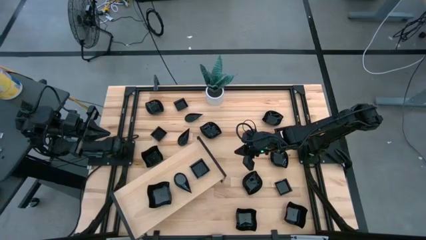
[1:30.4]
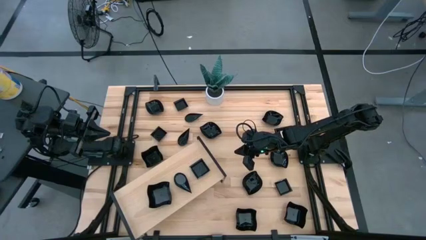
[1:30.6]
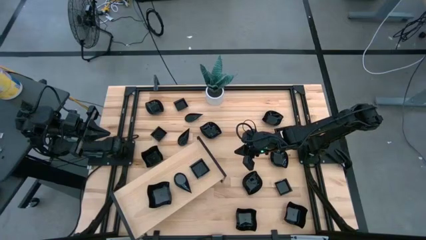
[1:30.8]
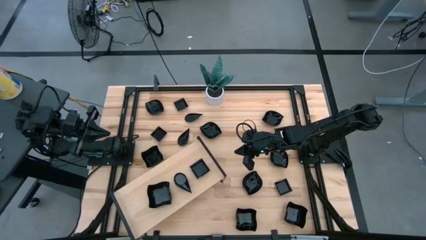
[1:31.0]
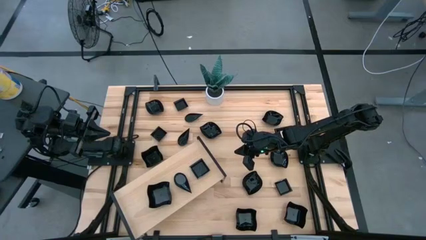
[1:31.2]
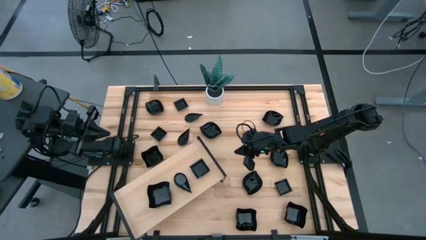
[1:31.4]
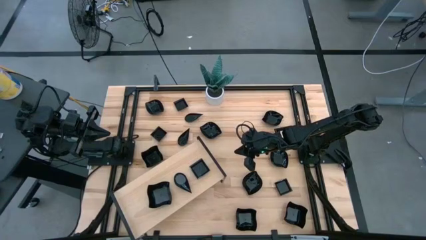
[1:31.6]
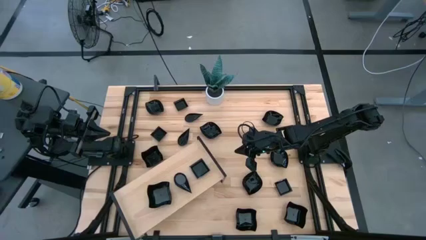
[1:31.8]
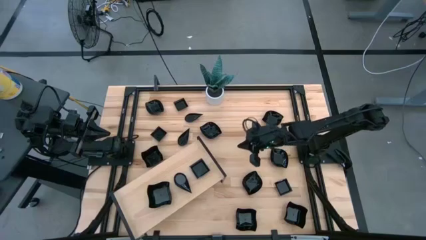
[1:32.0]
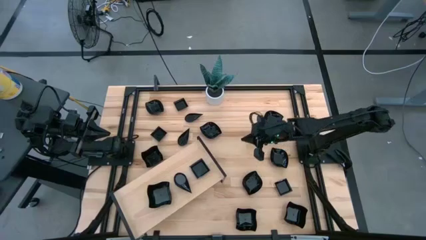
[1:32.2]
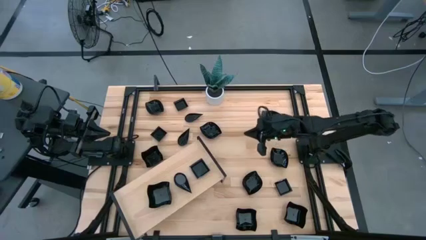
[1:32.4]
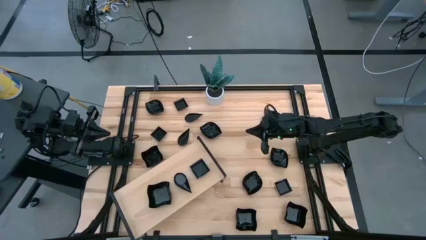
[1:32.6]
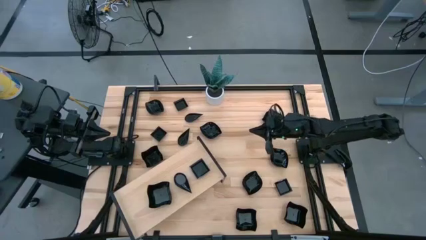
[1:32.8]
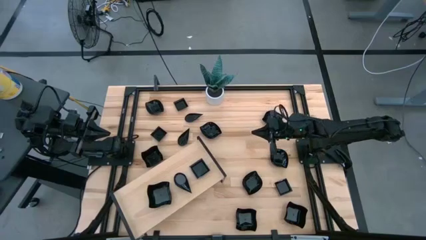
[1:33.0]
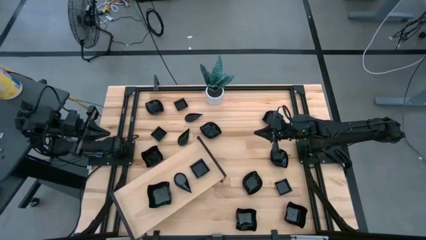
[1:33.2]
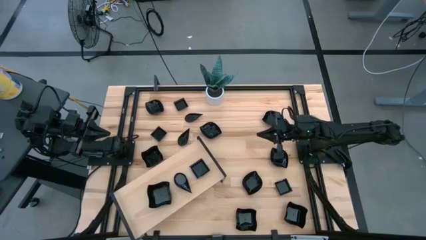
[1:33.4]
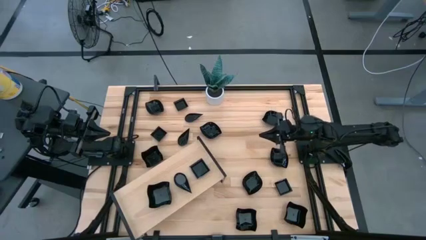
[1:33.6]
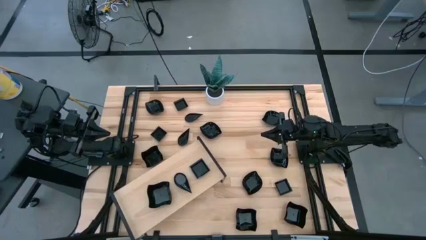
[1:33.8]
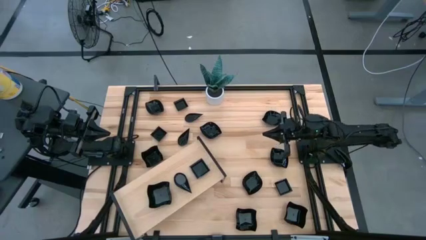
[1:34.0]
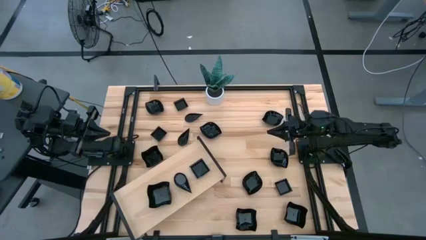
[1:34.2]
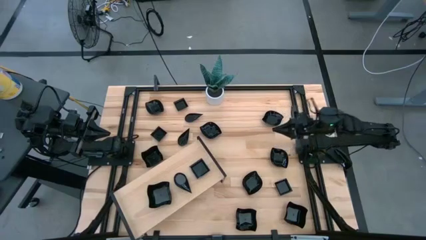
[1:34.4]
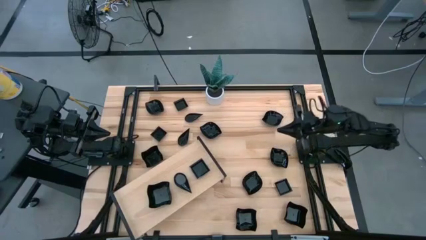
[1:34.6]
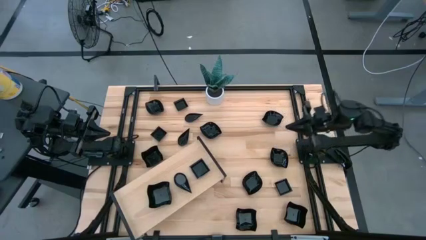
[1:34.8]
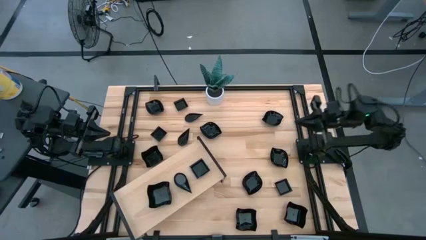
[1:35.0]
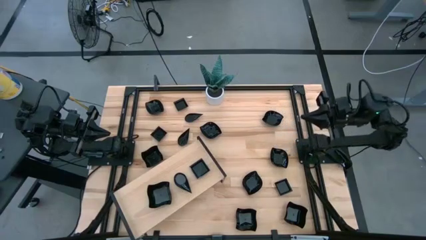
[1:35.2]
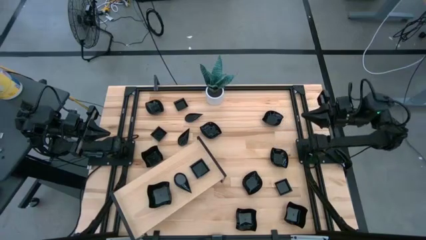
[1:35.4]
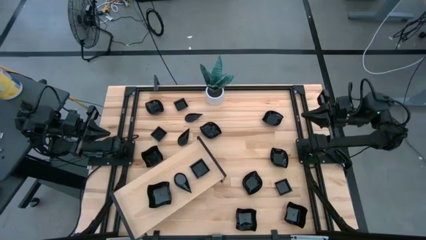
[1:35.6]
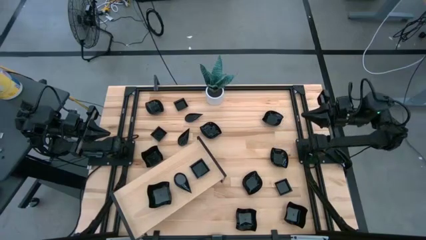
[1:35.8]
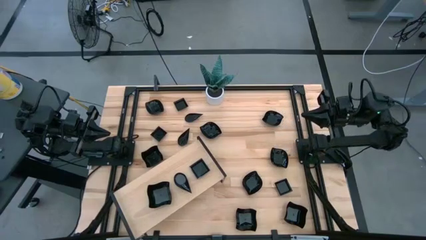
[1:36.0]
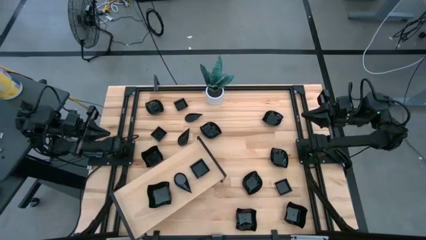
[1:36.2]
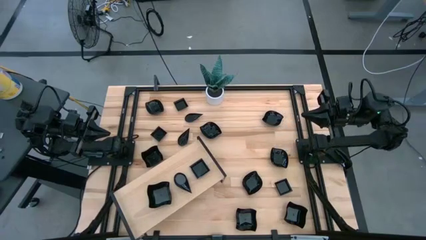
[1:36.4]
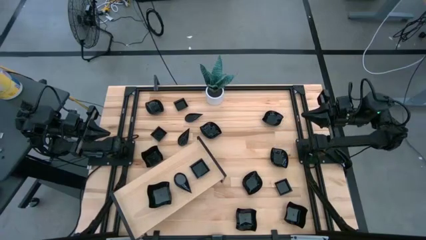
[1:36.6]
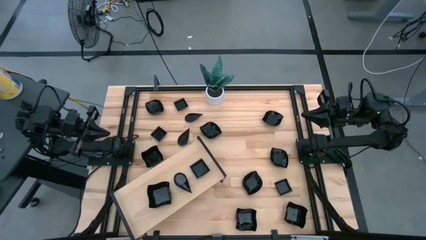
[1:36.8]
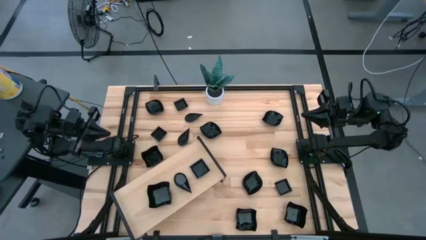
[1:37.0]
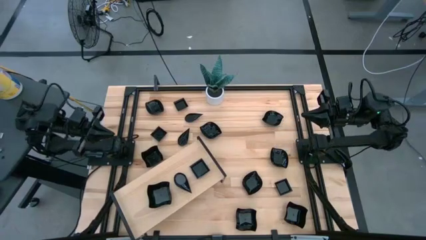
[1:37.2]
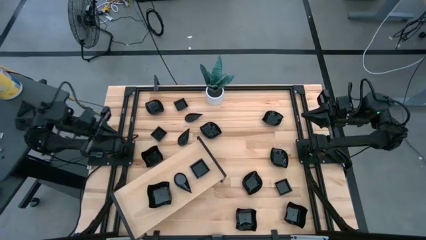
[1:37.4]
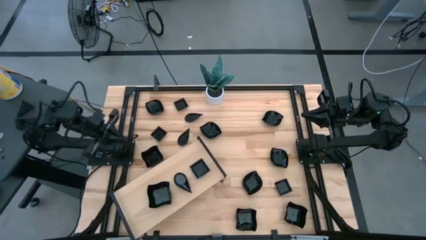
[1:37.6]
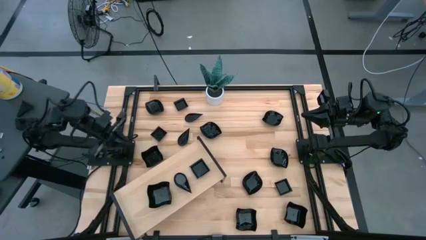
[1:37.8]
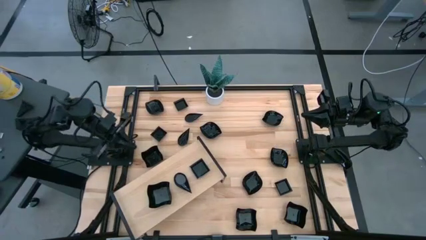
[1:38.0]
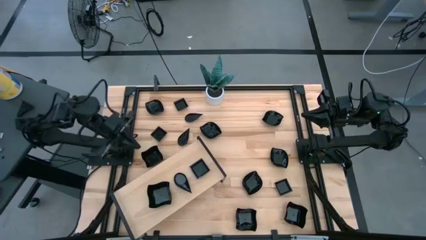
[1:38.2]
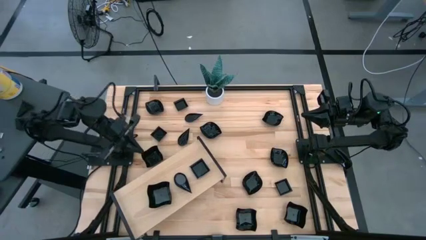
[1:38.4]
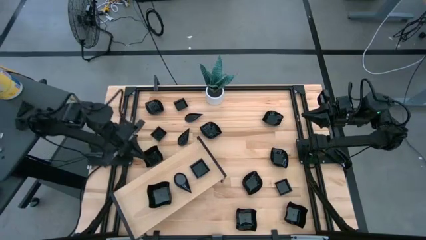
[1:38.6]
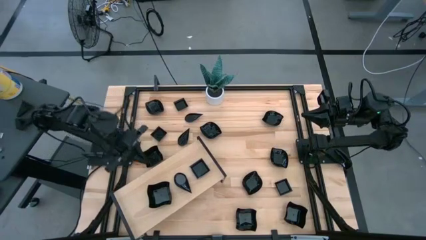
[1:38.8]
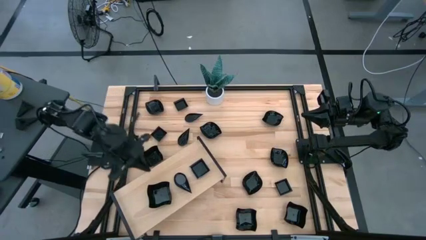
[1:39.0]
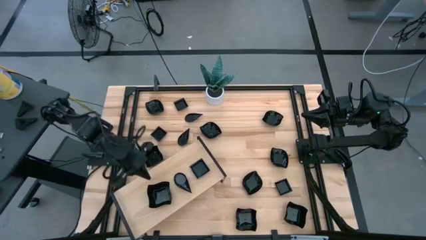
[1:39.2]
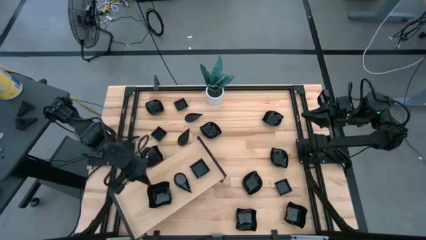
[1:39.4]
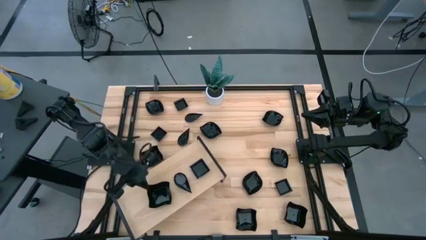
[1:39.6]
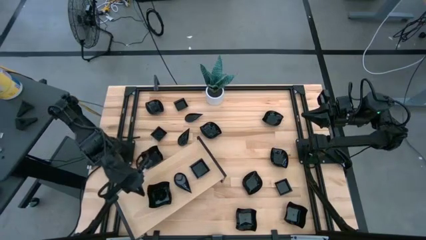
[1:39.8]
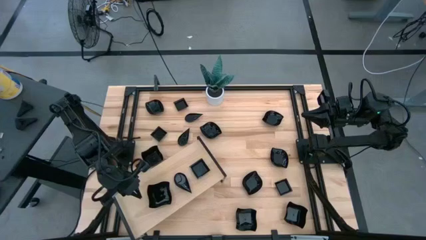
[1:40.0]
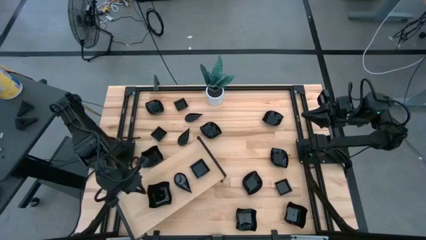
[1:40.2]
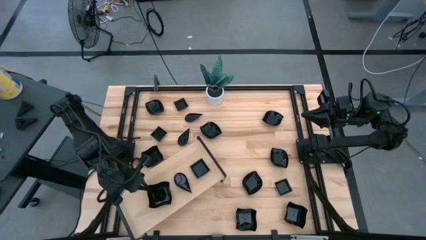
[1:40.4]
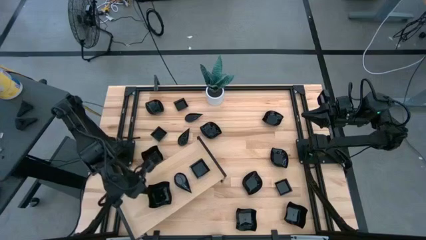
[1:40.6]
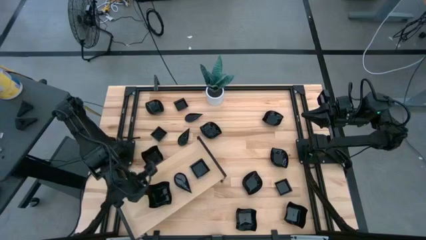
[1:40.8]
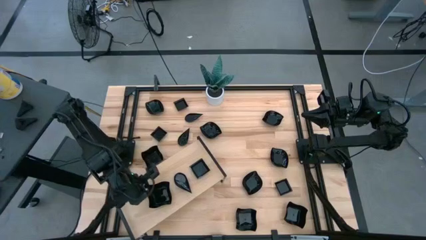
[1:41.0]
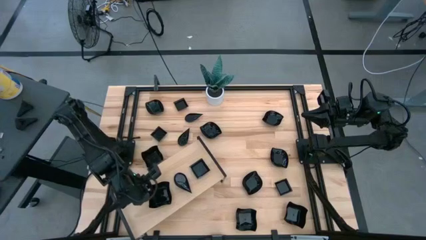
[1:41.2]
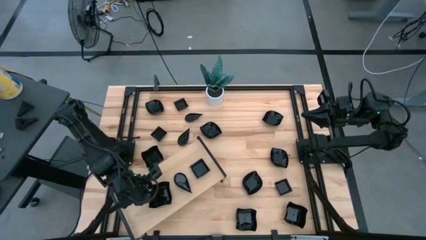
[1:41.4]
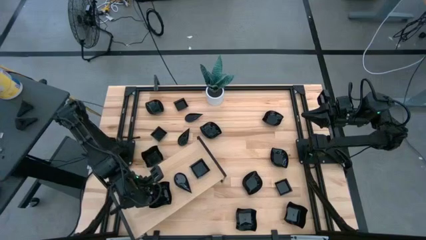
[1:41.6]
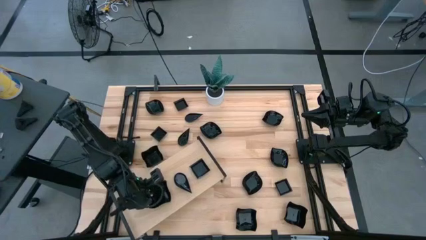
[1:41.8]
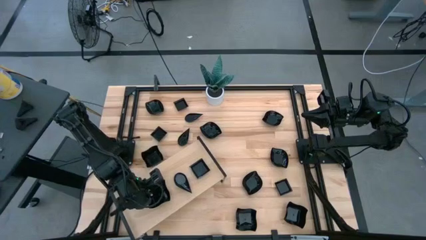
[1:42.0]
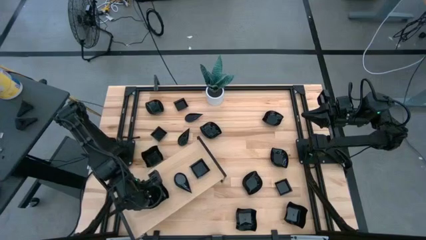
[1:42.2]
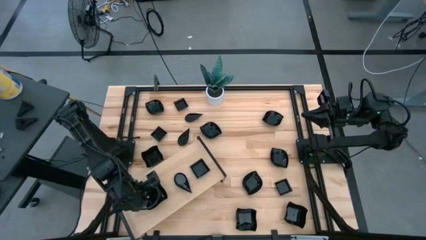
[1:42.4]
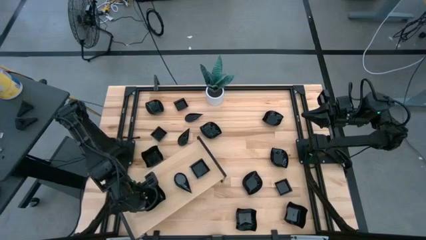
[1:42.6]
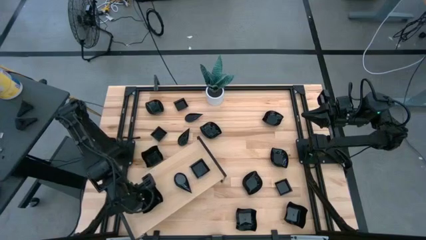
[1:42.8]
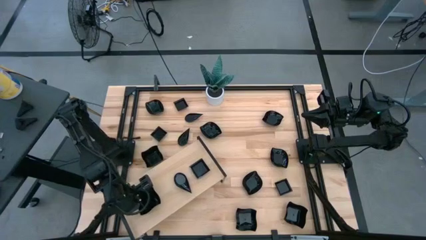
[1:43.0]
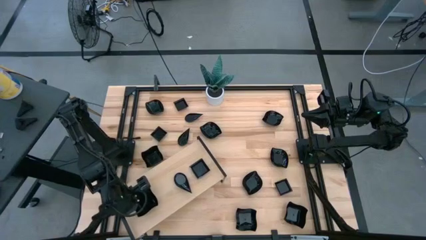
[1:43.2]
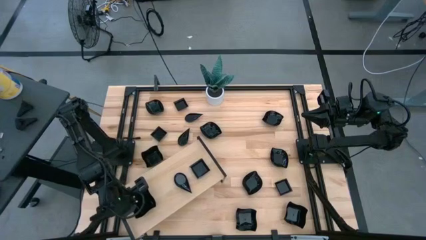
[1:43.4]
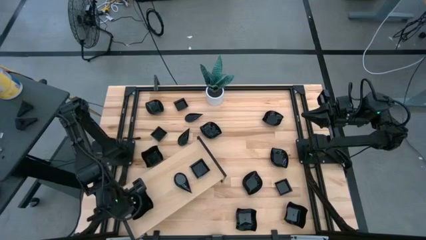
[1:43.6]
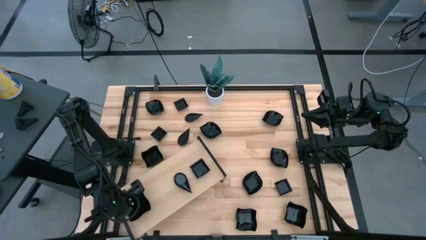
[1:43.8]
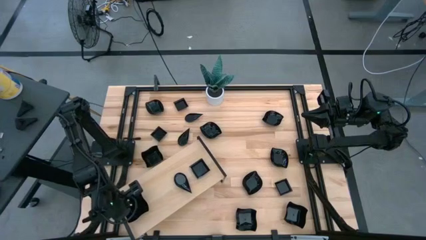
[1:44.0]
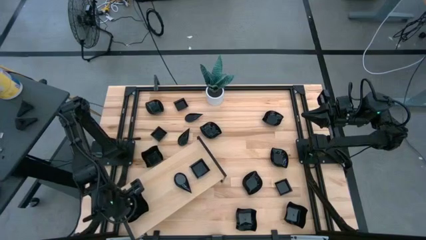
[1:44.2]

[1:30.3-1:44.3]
Task: Pick & Place Mini shaped plates
Put the black distorted square plate on the shelf

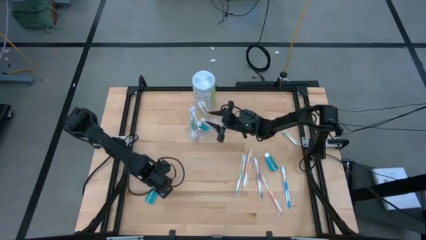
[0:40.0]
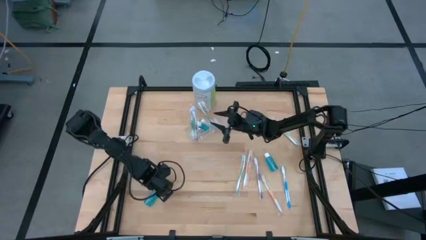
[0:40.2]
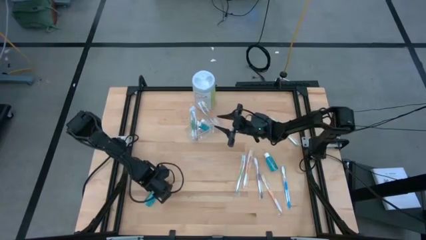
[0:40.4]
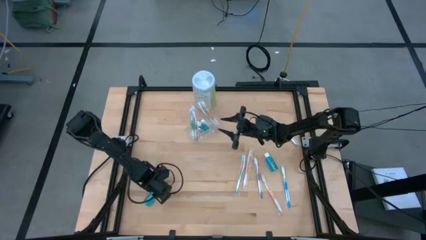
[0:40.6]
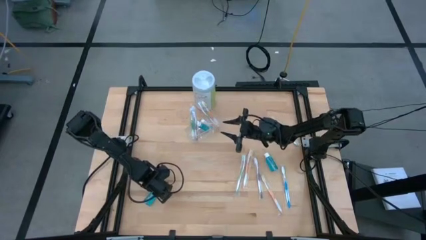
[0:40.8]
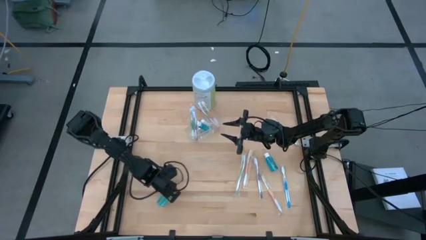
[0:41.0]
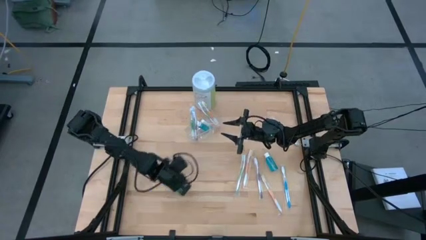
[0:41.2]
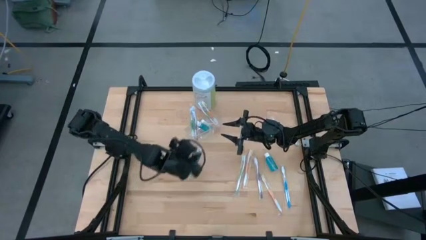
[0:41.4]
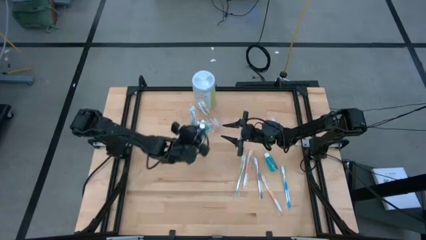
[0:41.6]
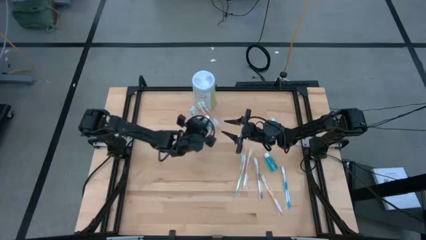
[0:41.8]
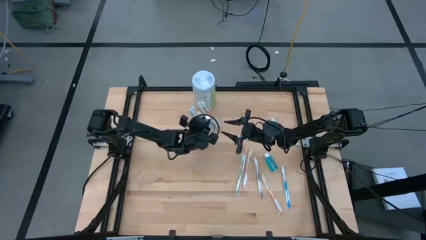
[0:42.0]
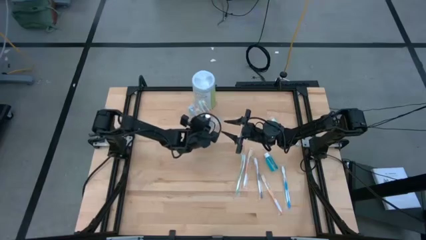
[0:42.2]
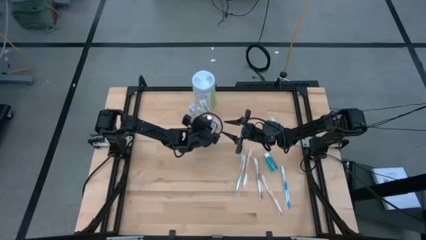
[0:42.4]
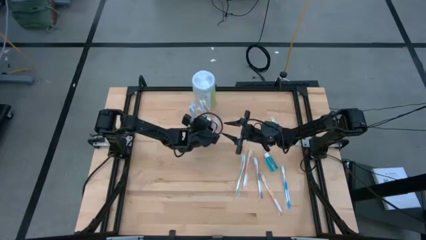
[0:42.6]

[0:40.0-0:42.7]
Task: Pick & Place toothbrushing station
Put the blue mouthwash into the transparent organizer
